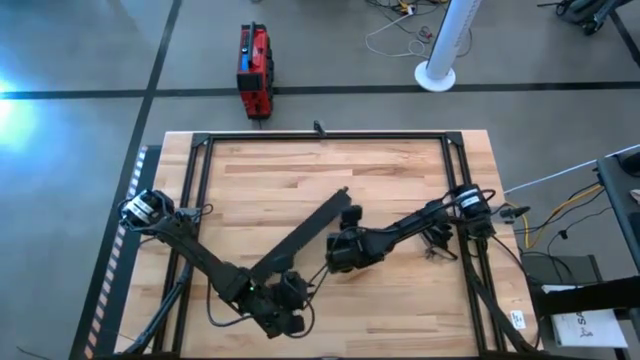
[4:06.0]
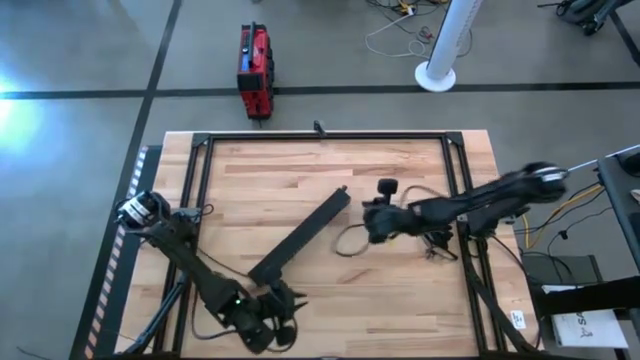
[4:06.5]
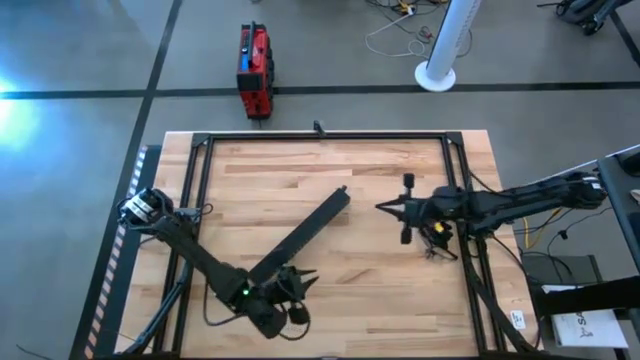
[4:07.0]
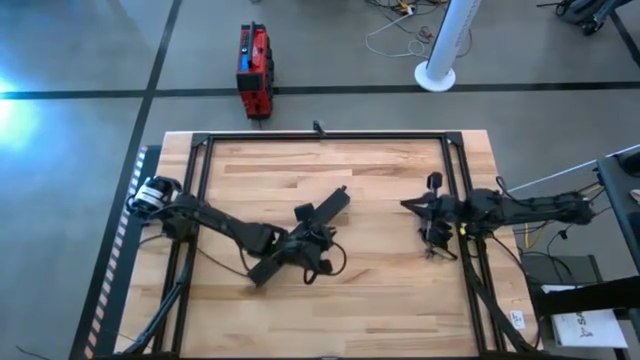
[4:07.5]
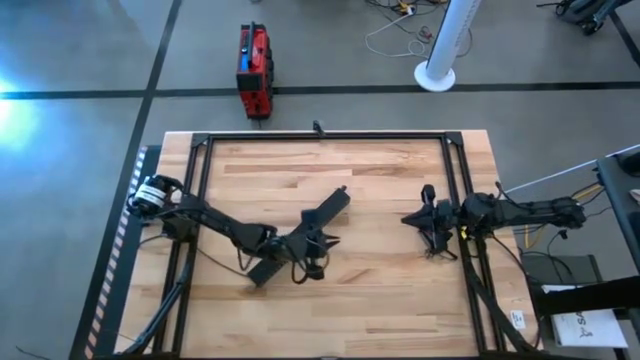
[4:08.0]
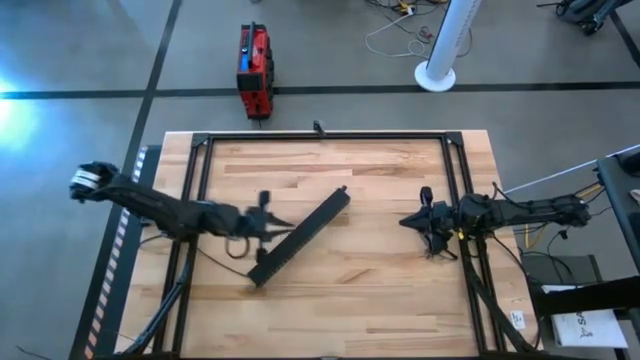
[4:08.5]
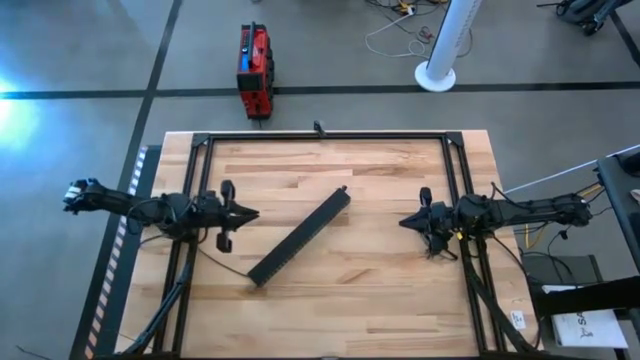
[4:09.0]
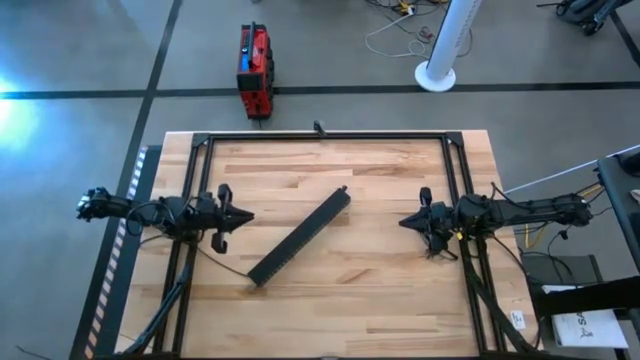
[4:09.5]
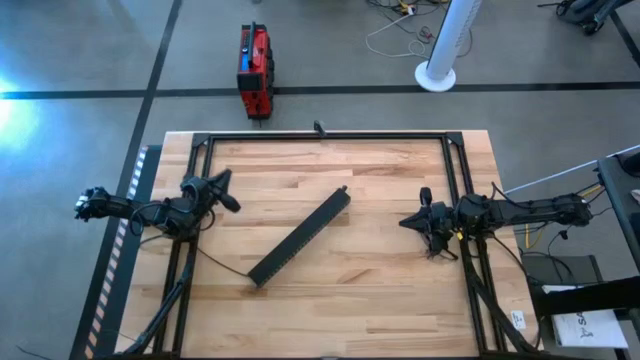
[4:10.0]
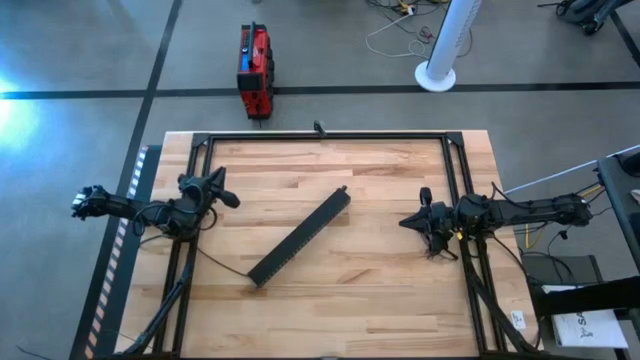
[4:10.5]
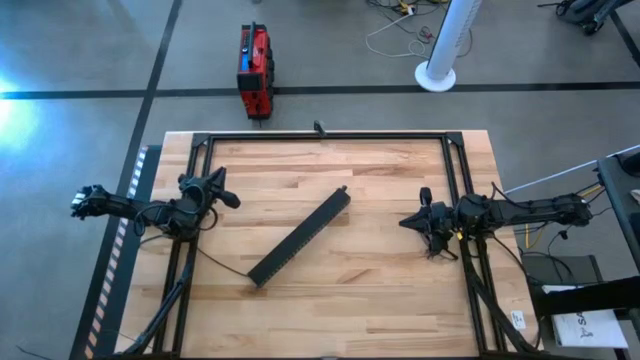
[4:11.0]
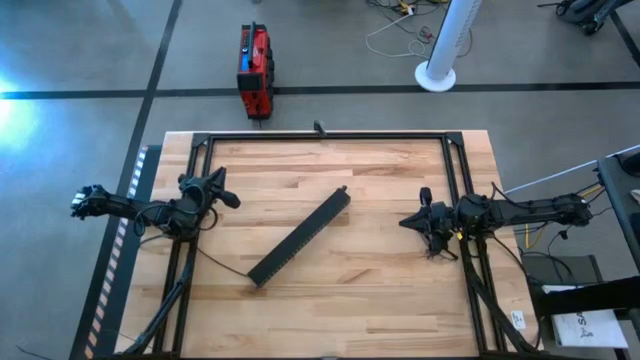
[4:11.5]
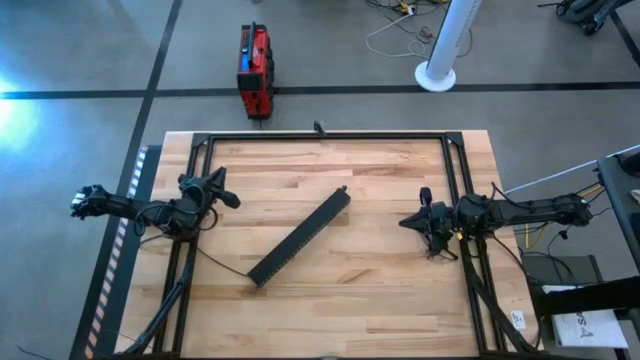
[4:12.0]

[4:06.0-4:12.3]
Task: Ziptie cables
Return to Home Position

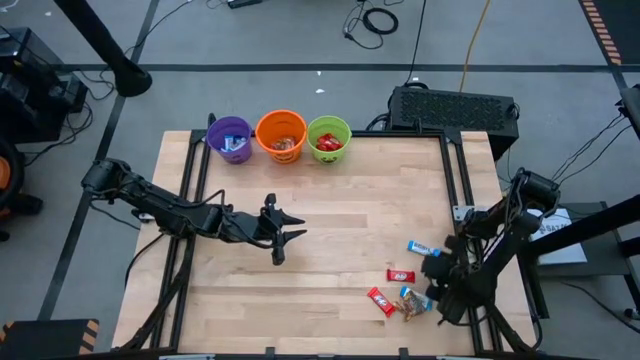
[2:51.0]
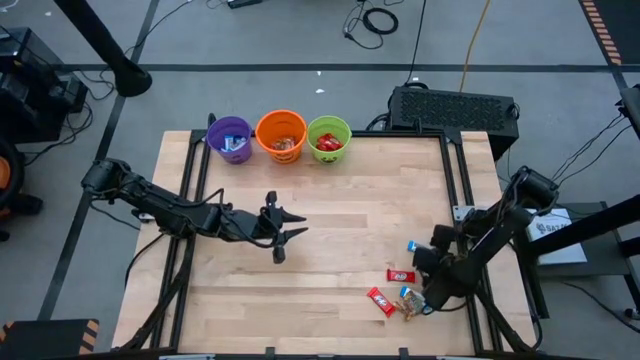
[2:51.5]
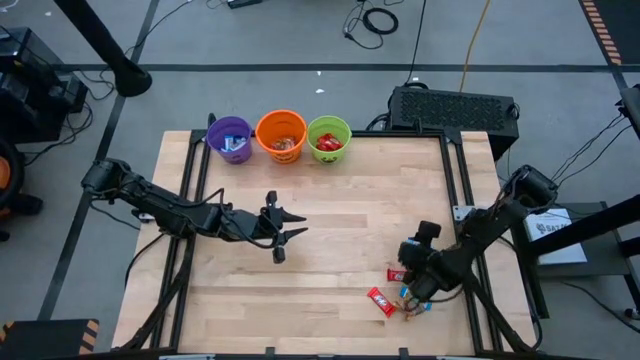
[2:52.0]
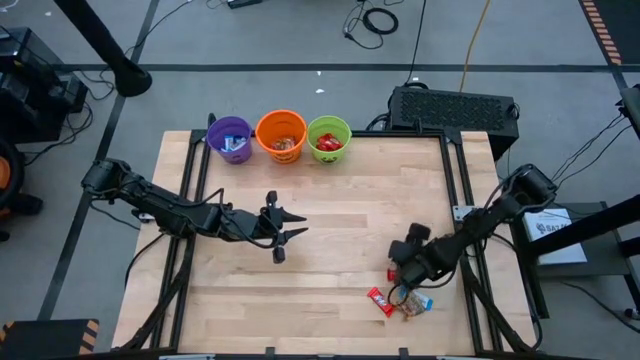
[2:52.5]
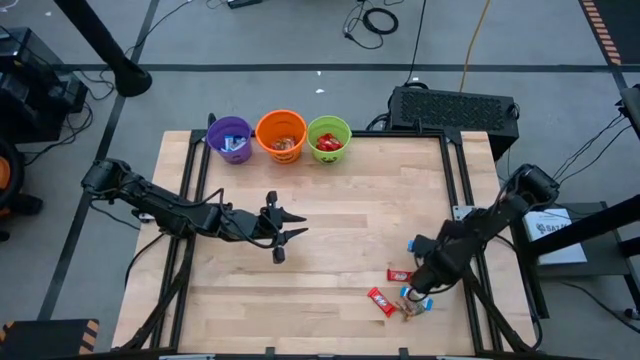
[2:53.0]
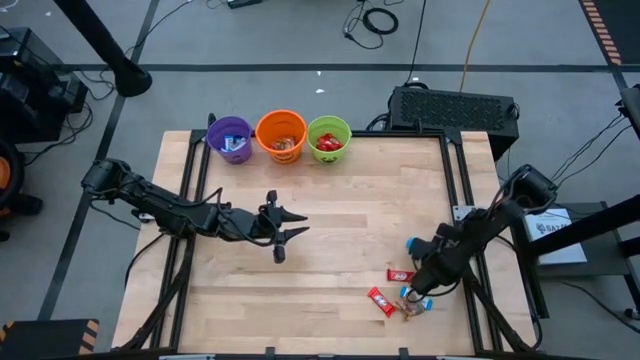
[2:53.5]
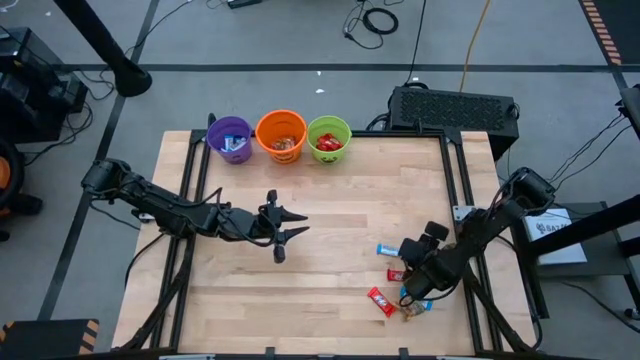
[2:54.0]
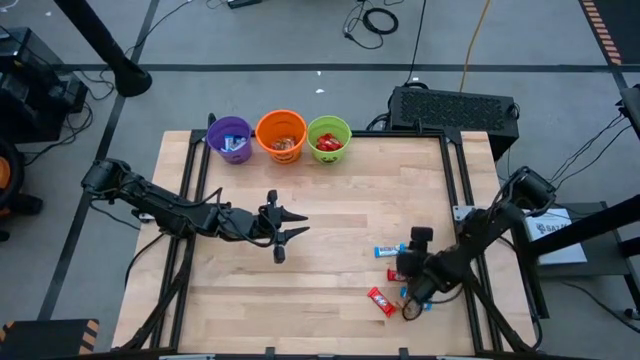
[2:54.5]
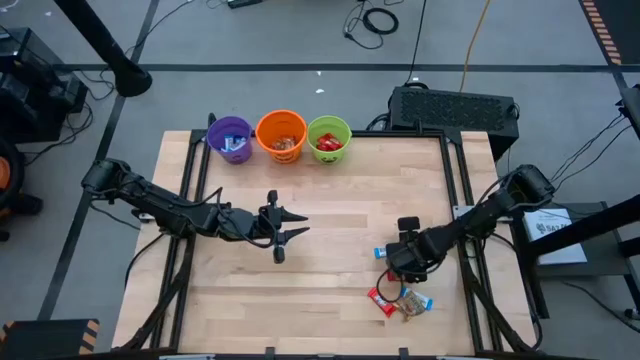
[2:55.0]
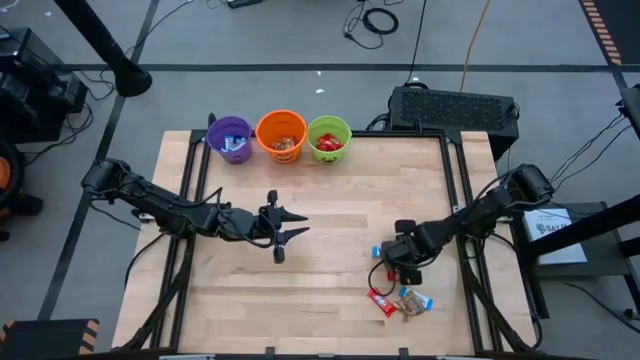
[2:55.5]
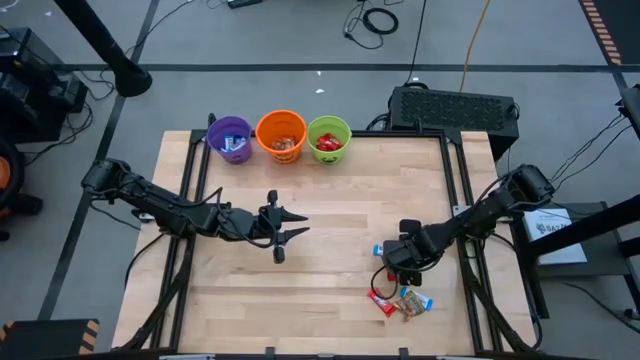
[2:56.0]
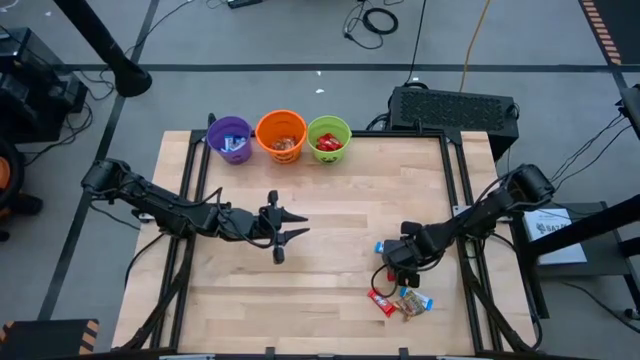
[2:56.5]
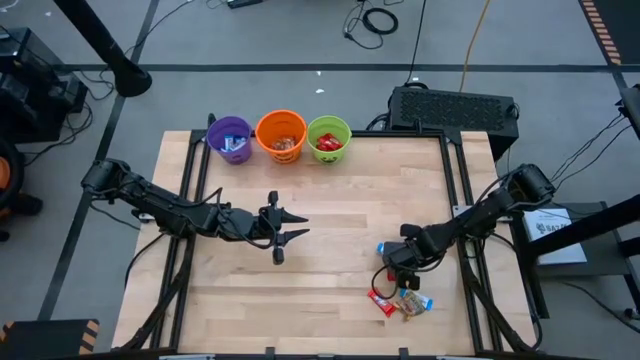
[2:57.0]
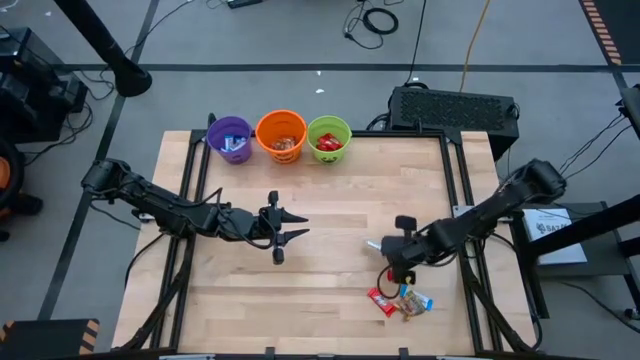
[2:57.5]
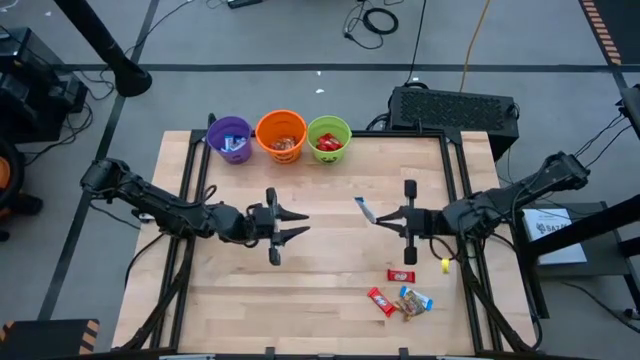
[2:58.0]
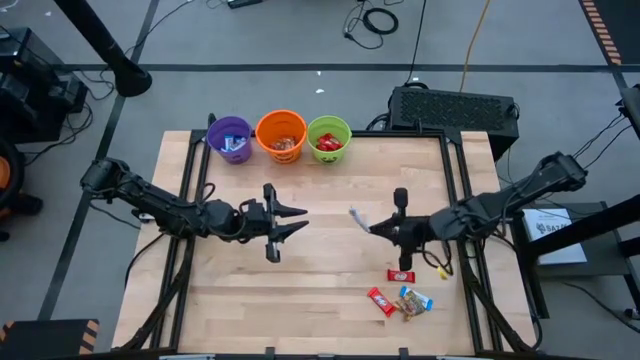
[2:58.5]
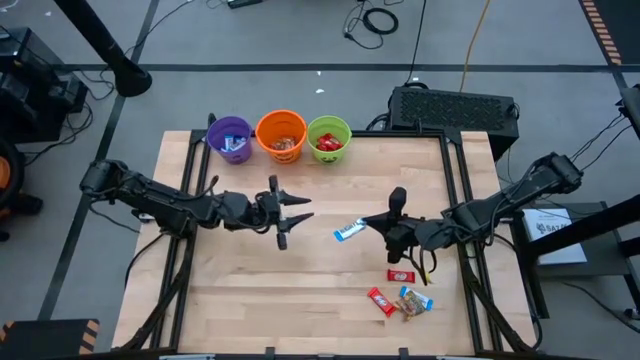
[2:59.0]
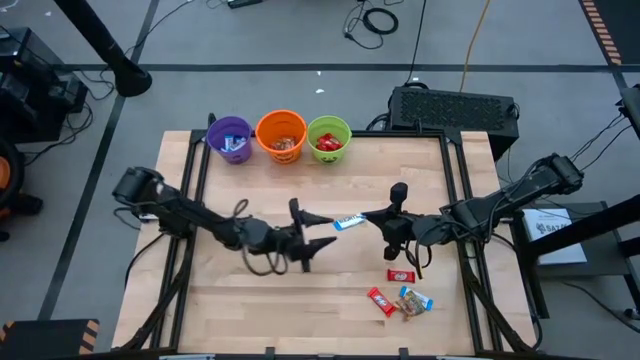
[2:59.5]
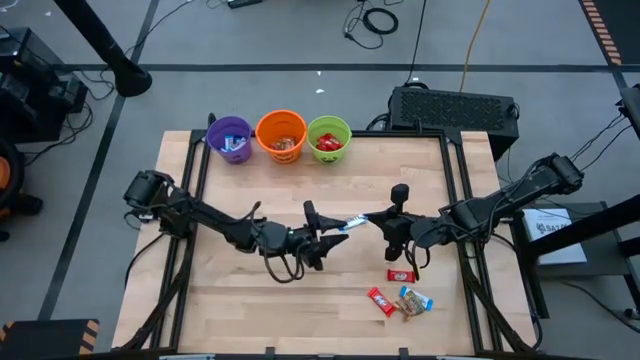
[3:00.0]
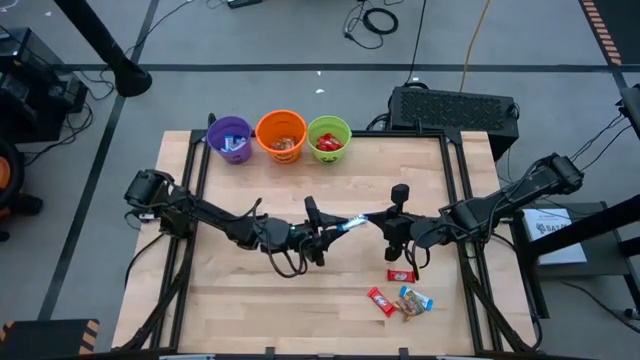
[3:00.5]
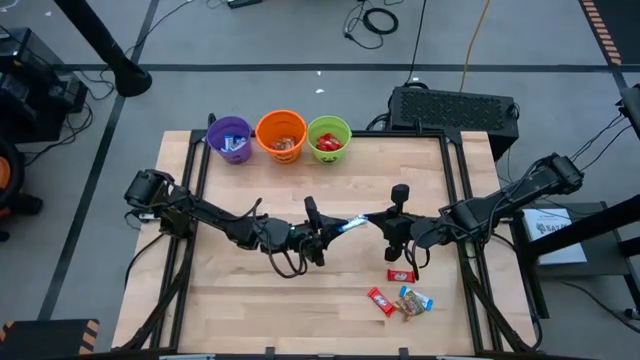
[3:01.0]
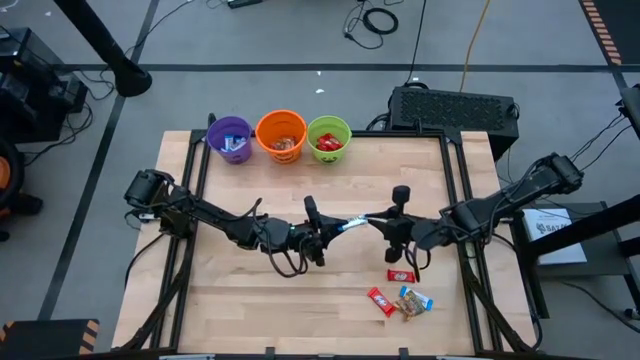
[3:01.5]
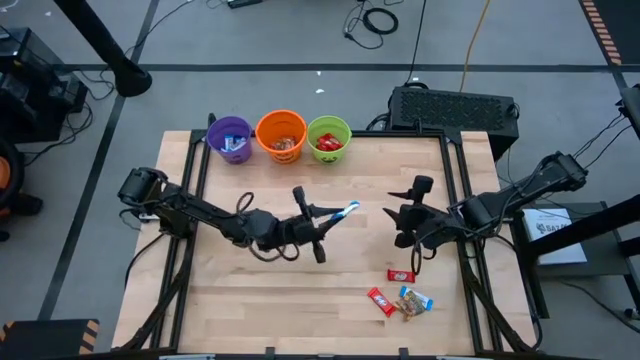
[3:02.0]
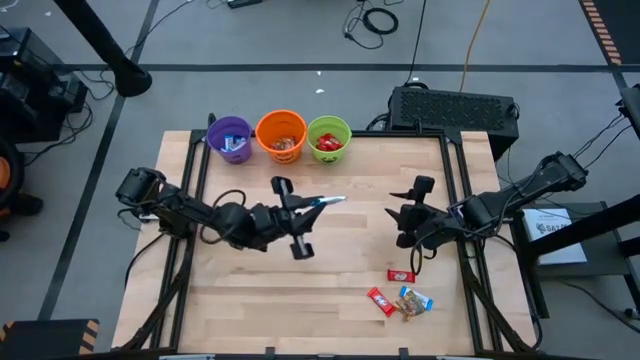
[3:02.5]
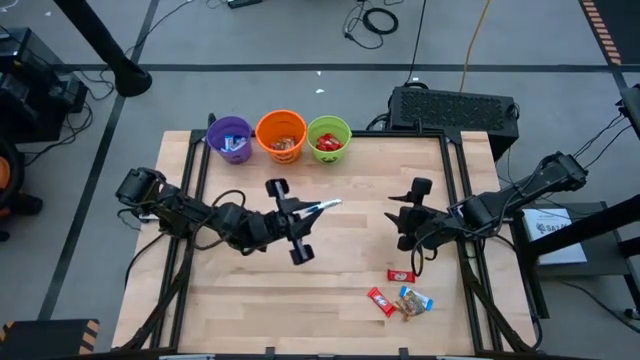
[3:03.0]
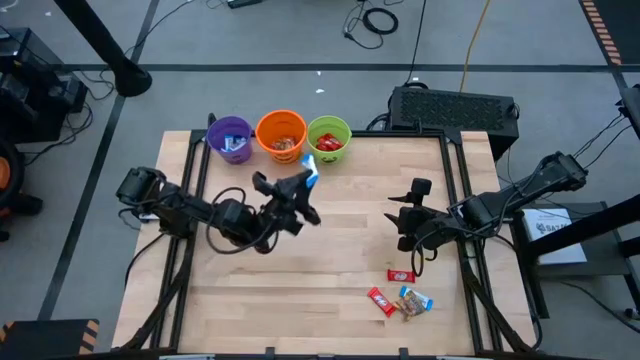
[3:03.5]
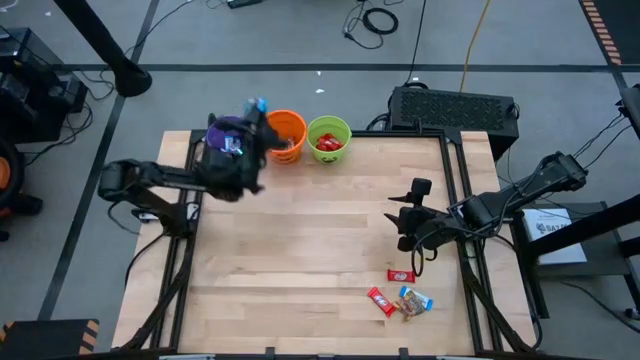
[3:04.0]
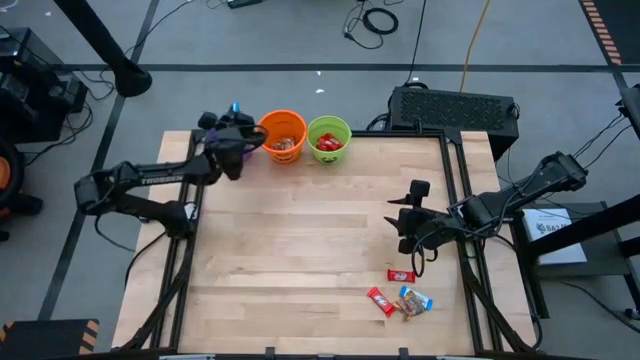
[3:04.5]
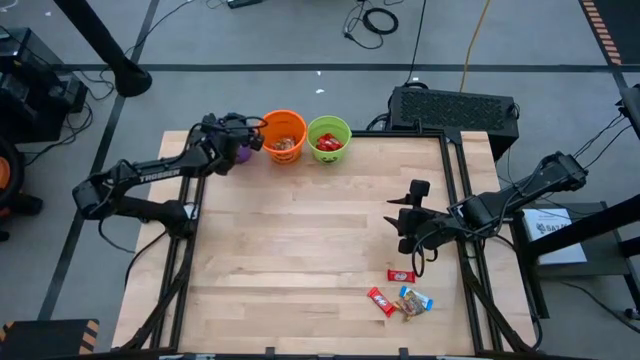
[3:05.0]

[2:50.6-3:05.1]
Task: Sort candy by brand, put in halloween buckets
Put the white chocolate bar into the violet bucket
